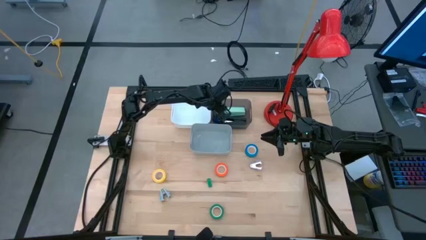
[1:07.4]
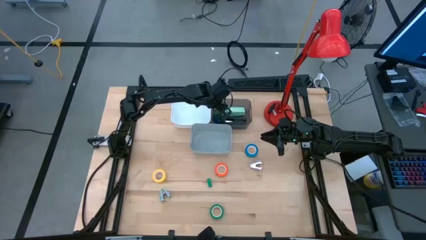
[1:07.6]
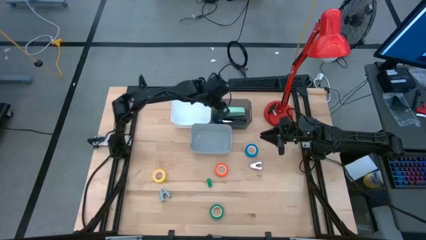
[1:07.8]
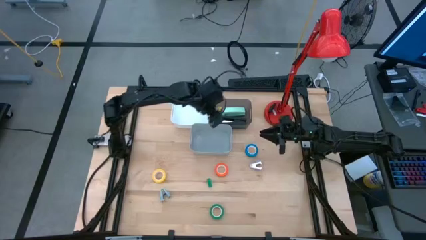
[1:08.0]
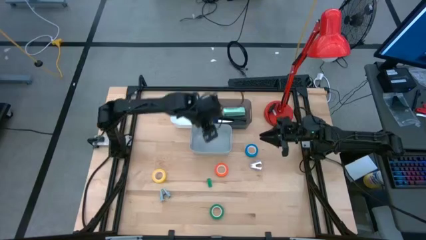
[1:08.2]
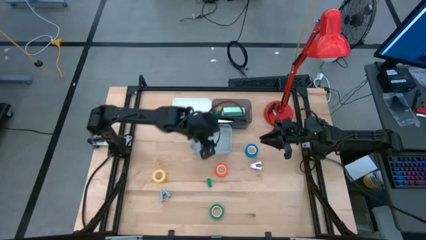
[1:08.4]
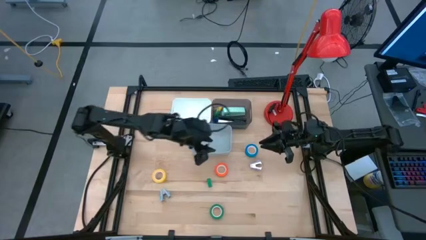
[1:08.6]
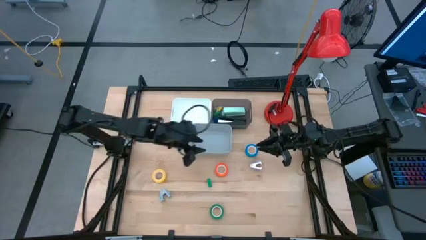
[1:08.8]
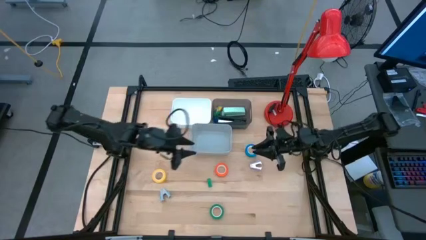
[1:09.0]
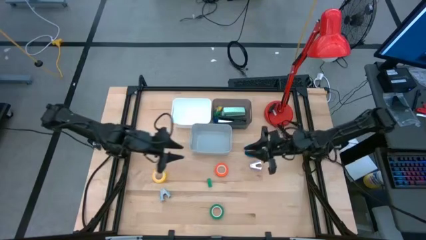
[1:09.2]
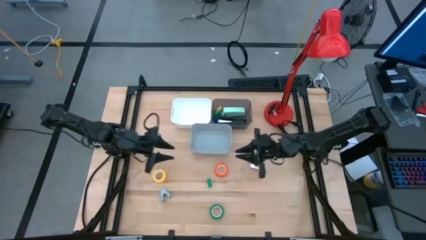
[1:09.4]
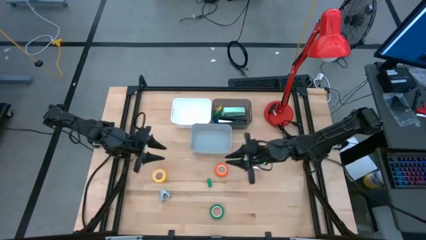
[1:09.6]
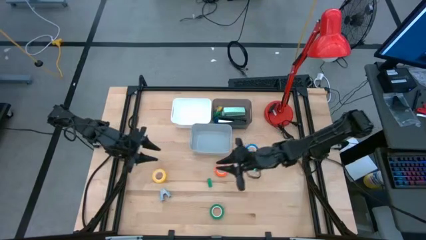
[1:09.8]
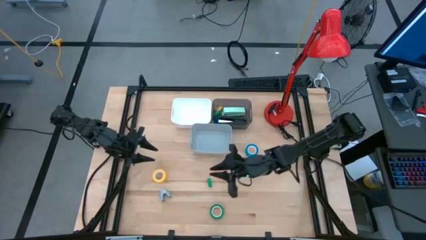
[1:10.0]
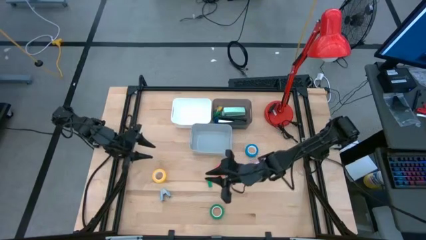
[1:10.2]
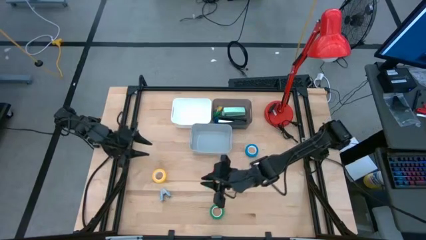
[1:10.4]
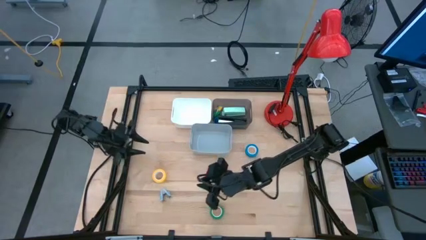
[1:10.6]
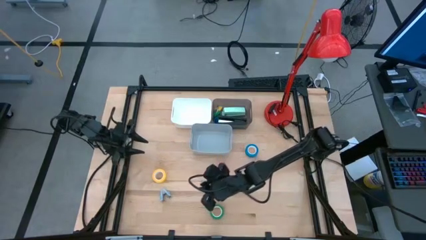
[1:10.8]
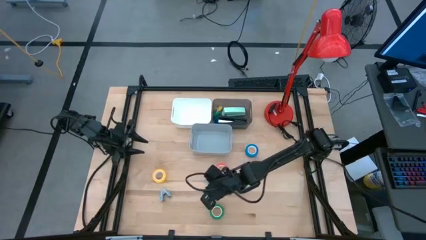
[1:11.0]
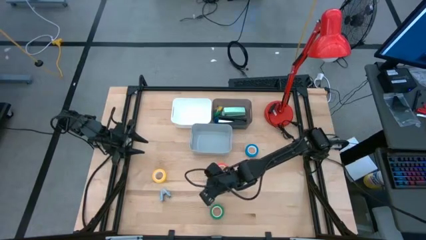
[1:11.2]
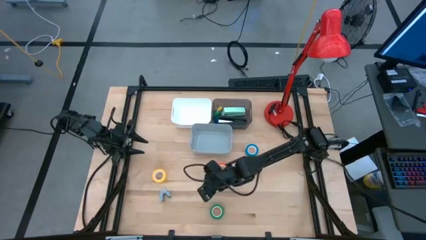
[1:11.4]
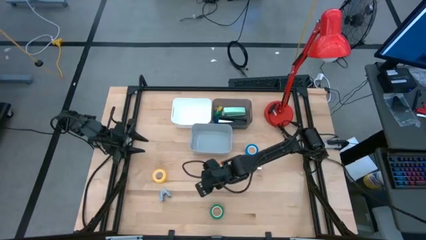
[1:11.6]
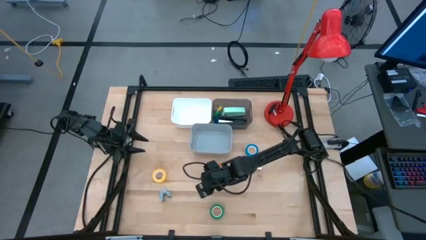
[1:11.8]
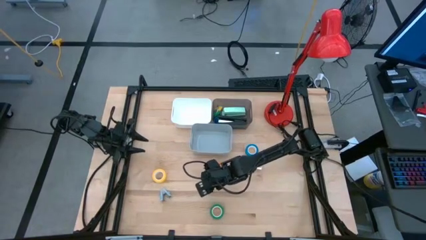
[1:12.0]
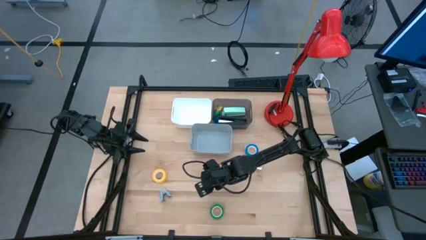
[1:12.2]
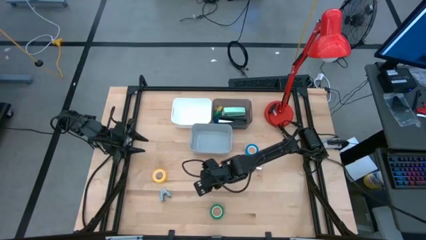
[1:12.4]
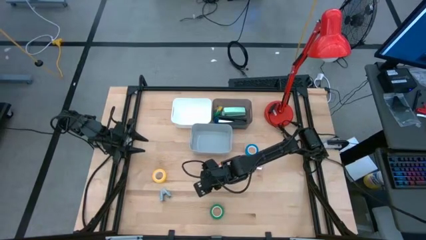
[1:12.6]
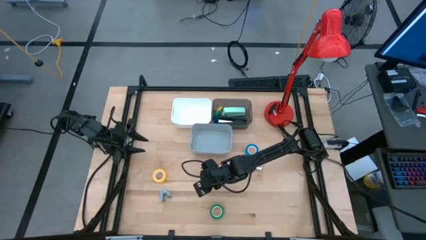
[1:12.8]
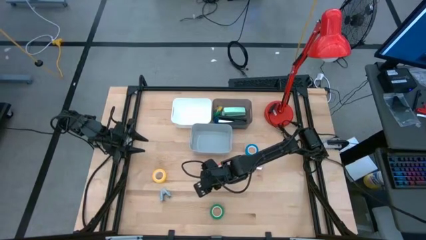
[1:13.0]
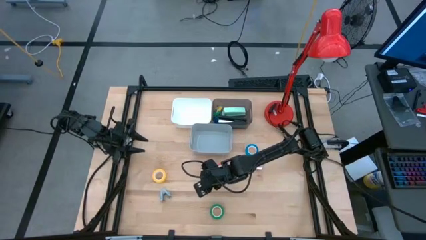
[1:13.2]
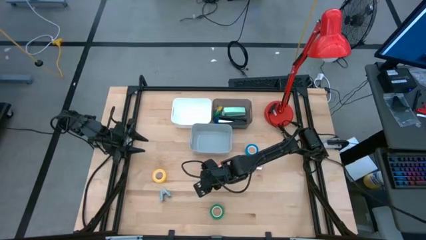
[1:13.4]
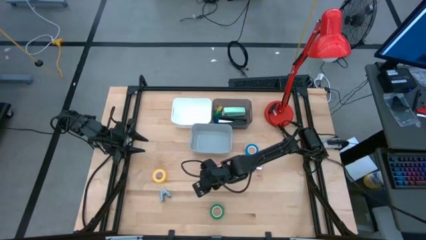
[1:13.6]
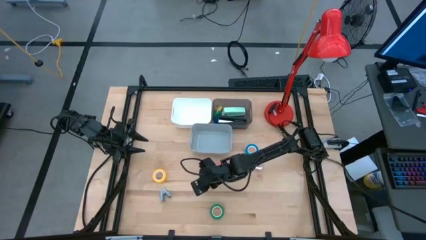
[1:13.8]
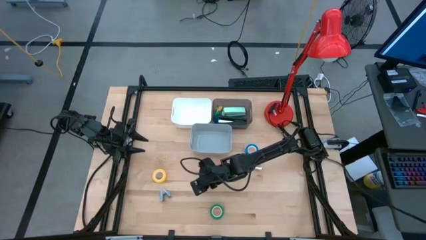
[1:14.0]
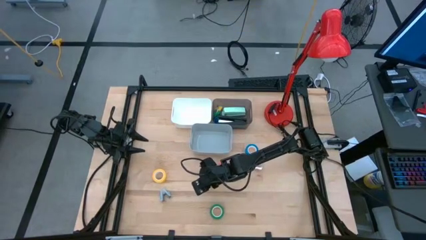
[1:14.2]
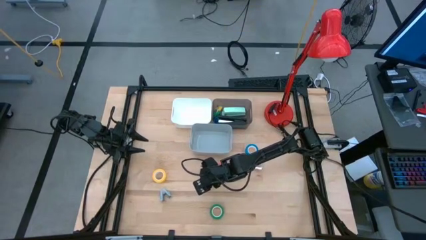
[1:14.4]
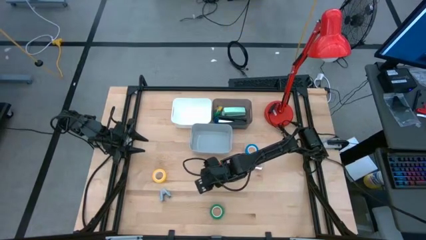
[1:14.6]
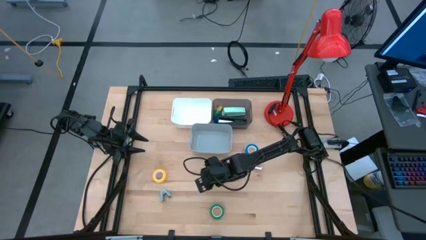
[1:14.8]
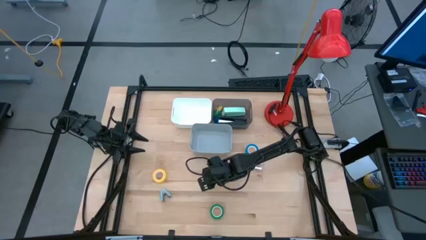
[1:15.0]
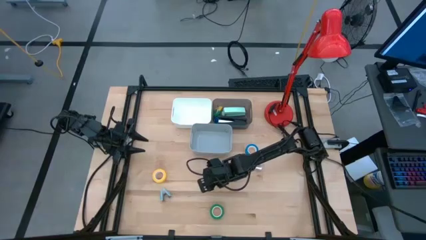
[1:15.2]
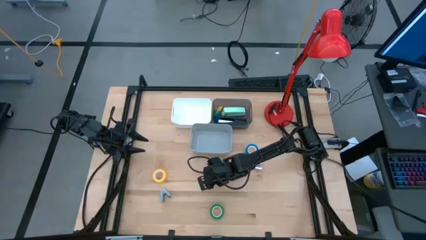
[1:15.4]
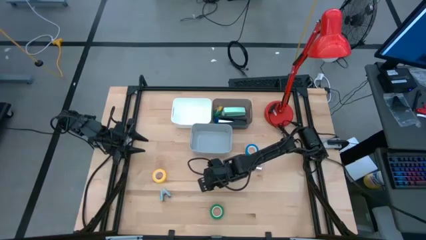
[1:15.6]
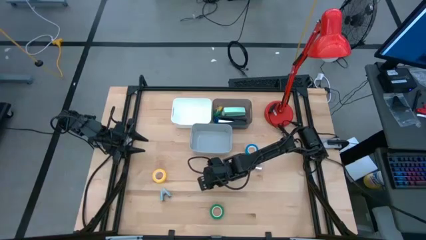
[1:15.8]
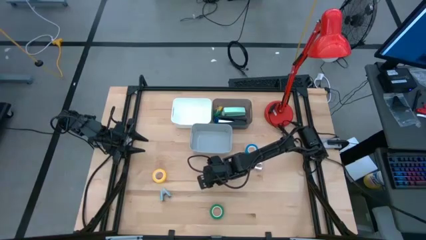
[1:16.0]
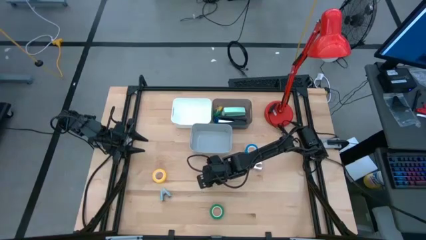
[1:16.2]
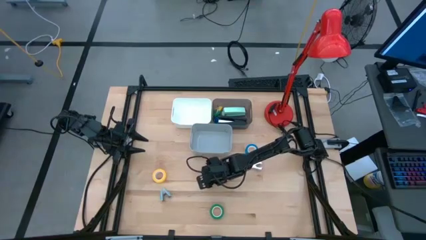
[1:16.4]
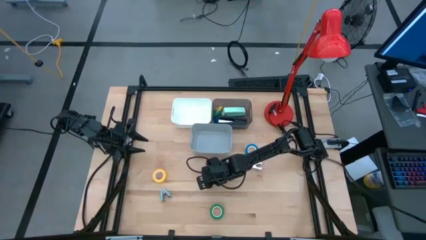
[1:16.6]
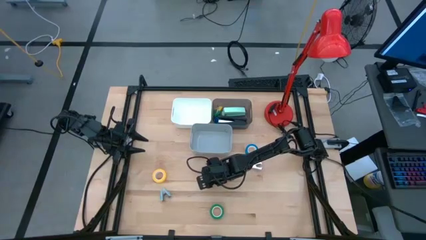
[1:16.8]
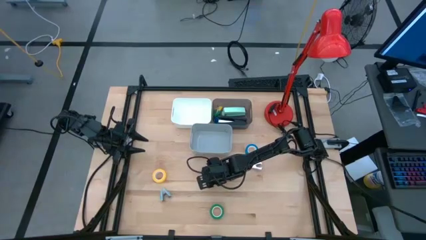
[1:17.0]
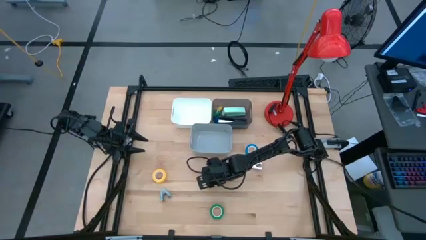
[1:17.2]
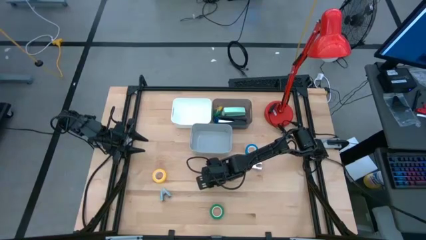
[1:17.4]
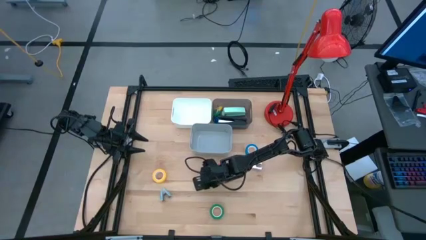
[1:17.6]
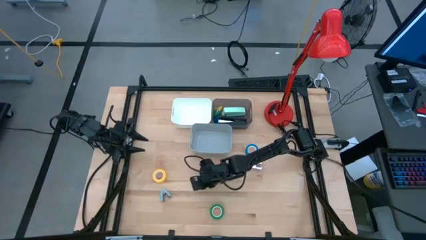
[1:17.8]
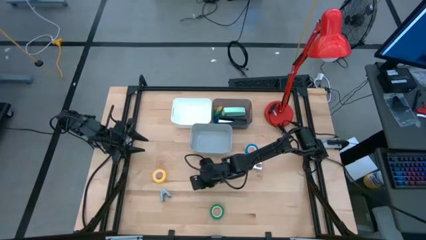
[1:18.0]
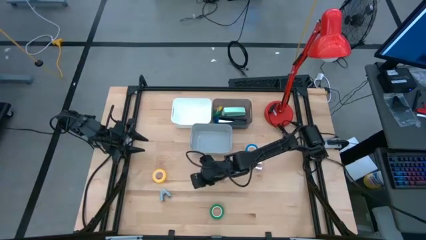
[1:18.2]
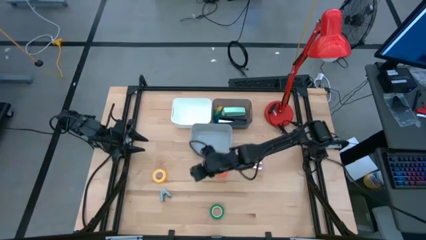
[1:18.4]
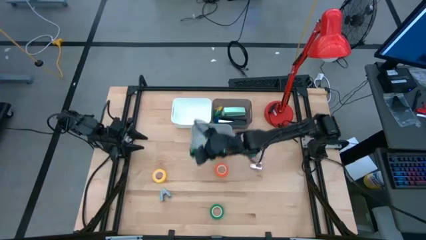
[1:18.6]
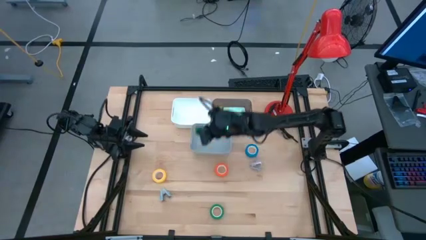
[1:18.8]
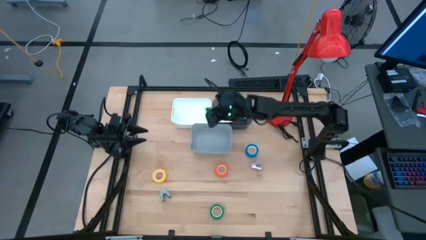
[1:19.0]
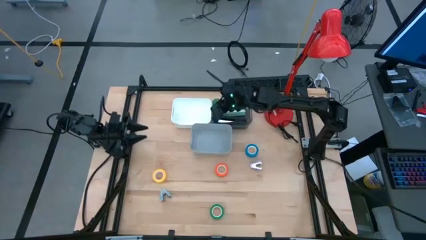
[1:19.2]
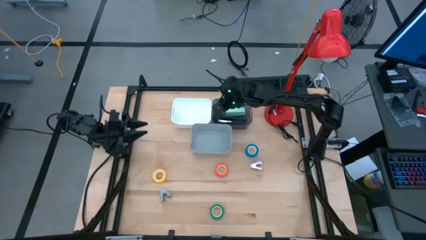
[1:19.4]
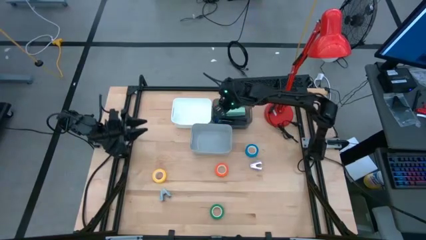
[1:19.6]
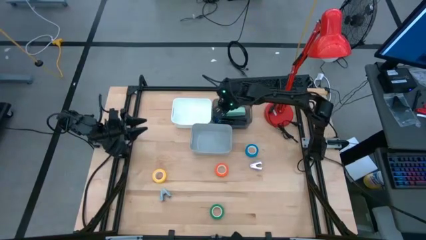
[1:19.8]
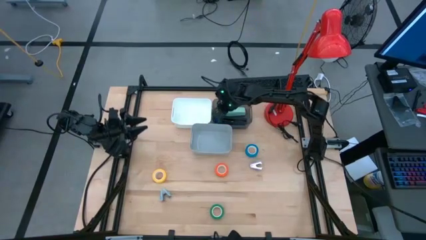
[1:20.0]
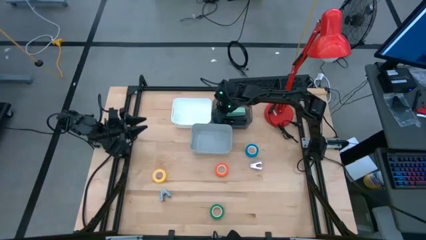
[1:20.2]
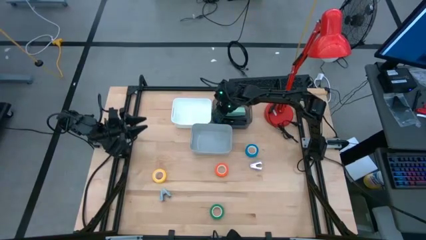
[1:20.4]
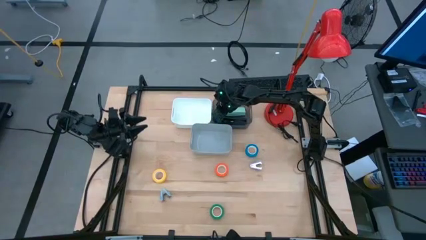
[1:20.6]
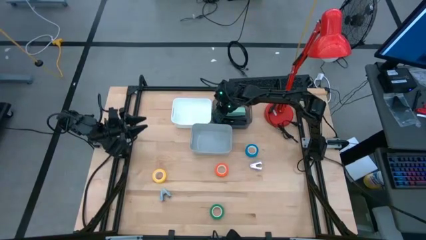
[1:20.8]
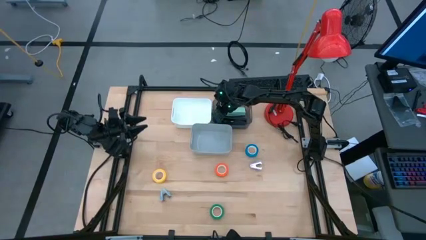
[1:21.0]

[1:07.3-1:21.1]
Task: Pick and place Stapler, Stapler remover, tape
Put the green stapler into the black bin
